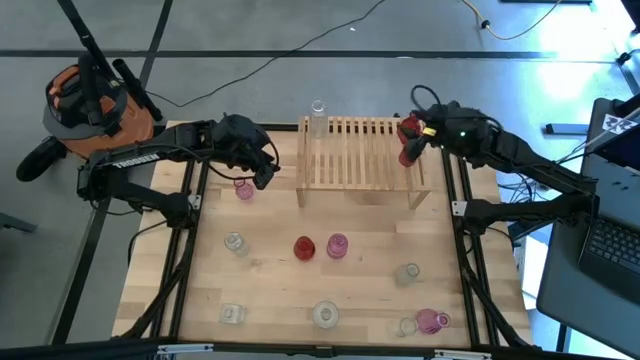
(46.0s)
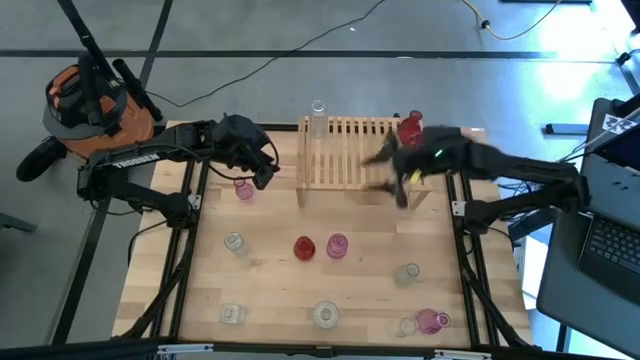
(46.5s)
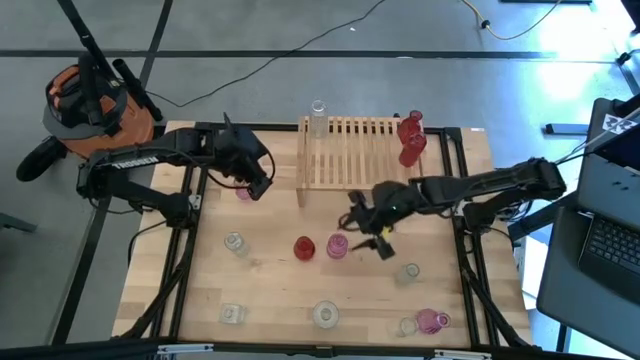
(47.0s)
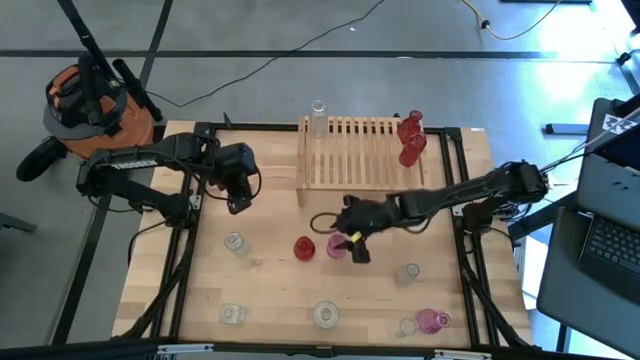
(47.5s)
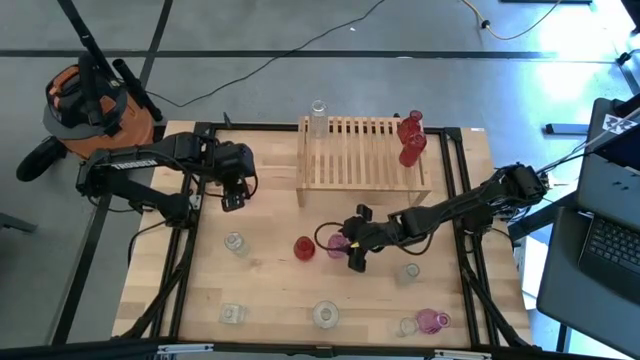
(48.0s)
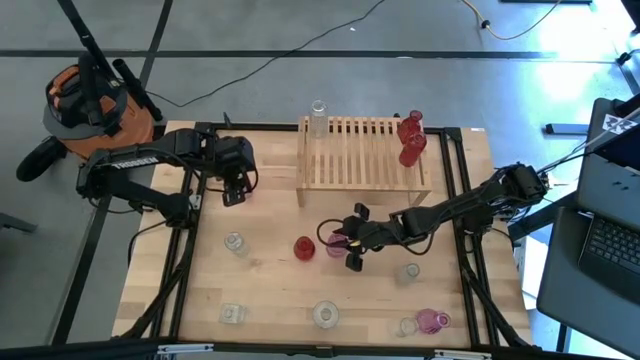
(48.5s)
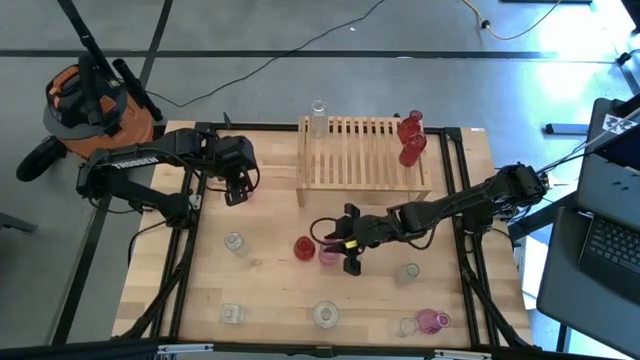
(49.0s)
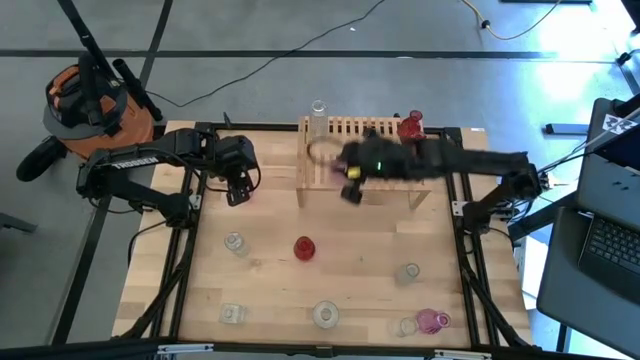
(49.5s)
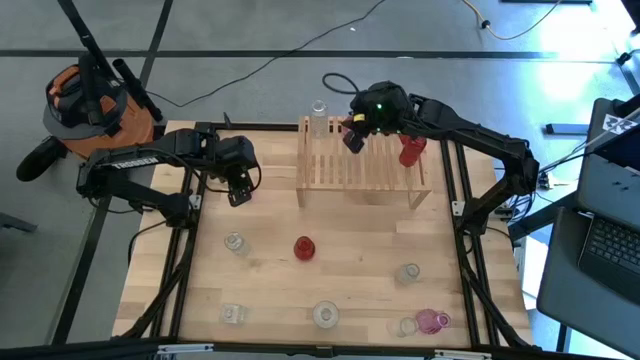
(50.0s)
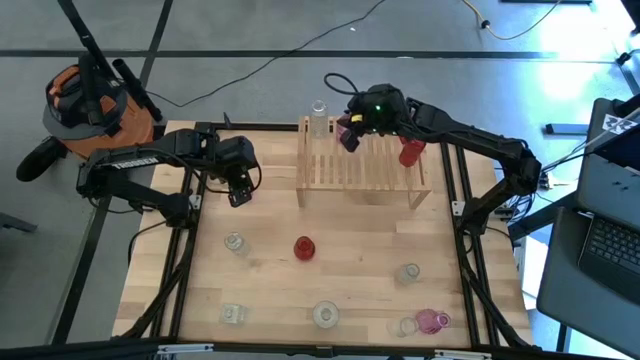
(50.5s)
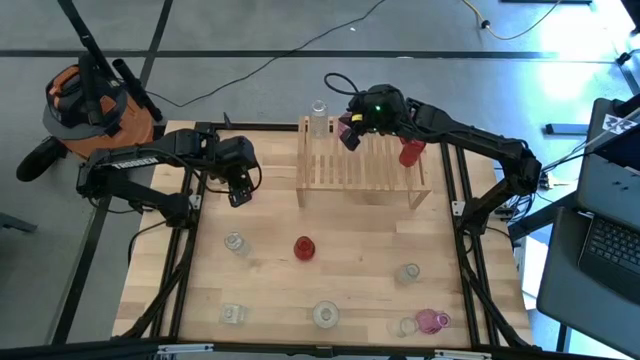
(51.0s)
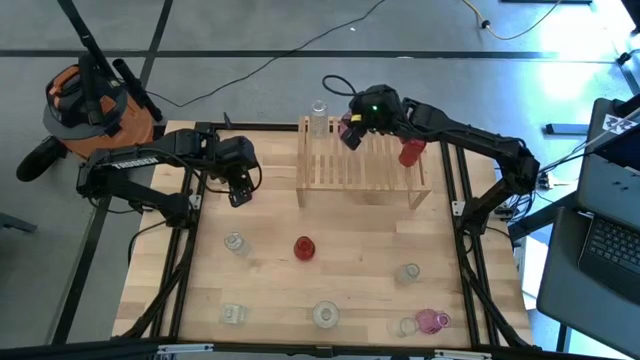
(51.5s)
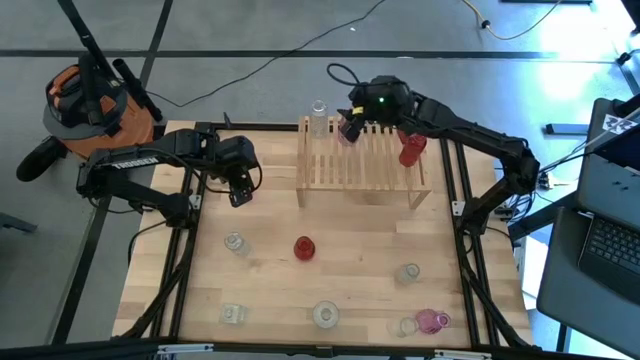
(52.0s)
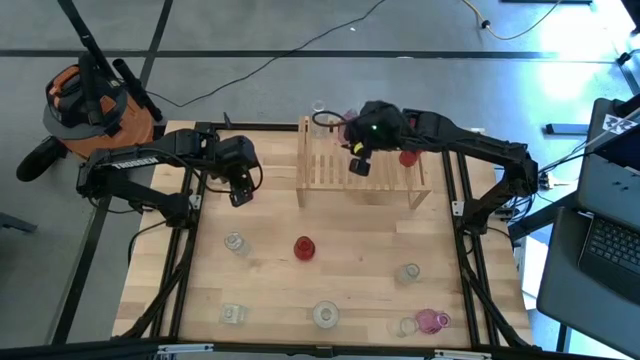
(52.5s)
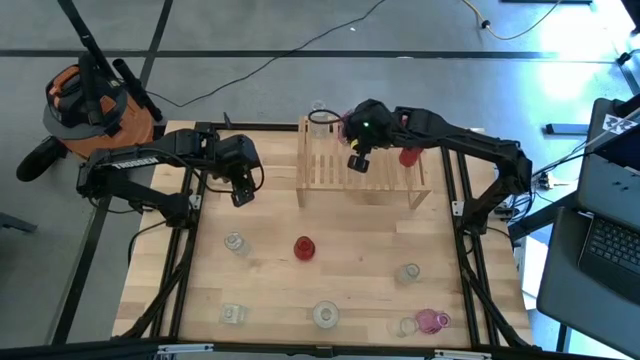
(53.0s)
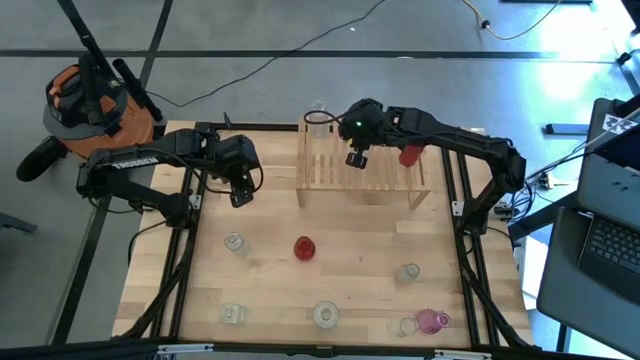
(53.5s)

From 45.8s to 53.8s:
Task: sort vases onto shelf
Put the middle pink vase on the shelf

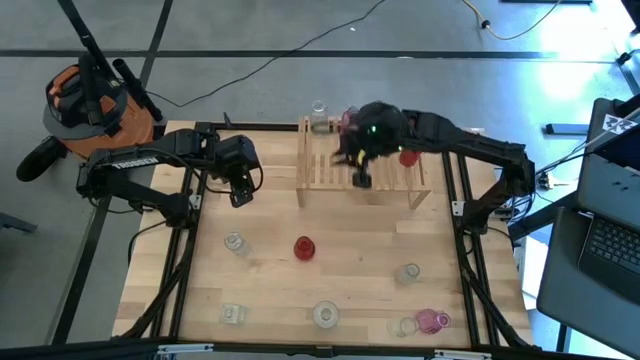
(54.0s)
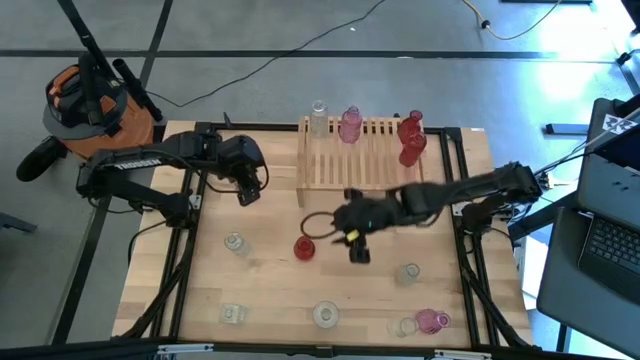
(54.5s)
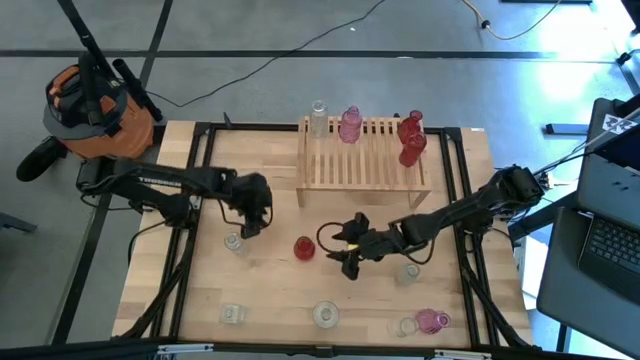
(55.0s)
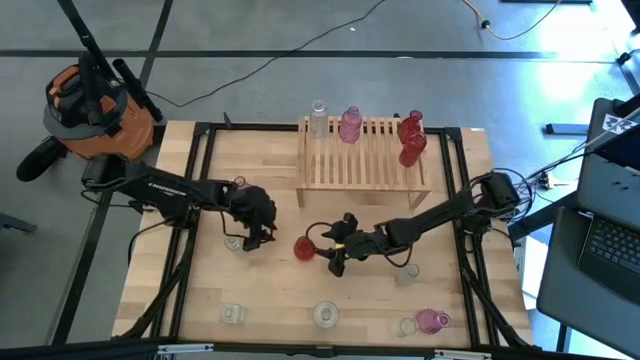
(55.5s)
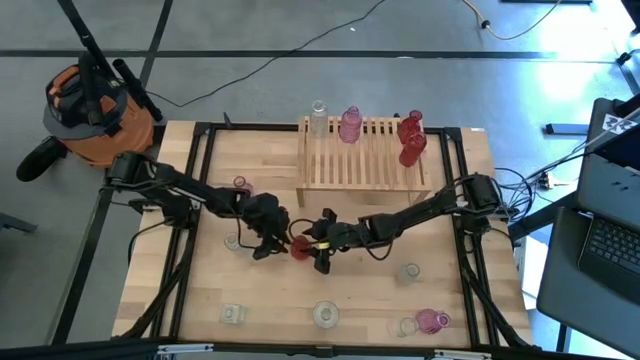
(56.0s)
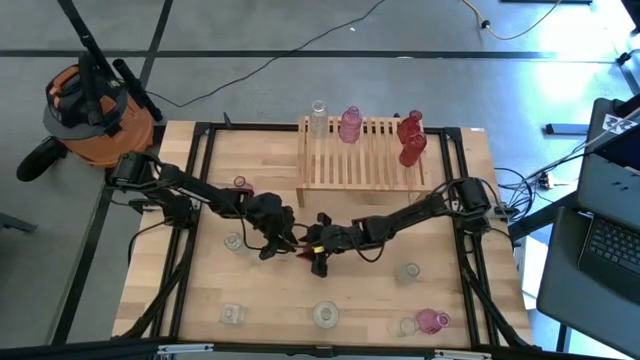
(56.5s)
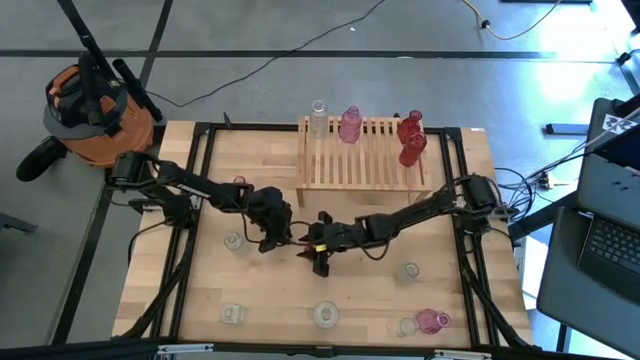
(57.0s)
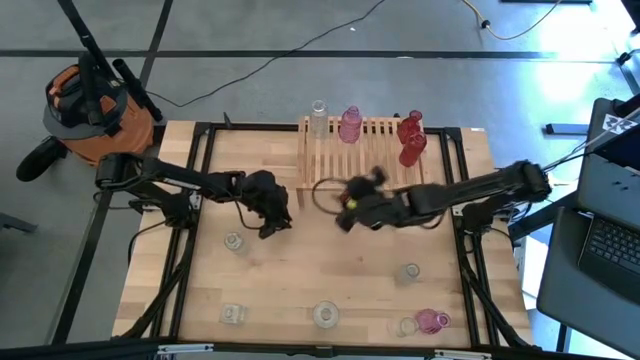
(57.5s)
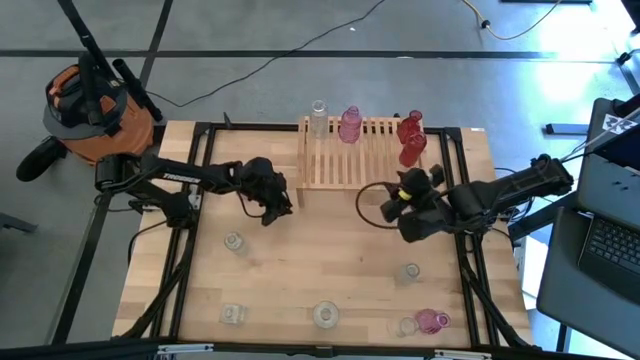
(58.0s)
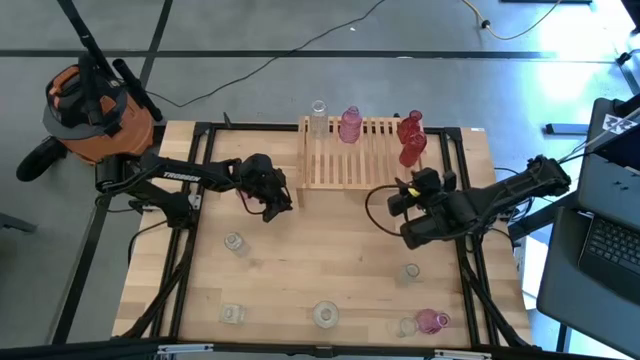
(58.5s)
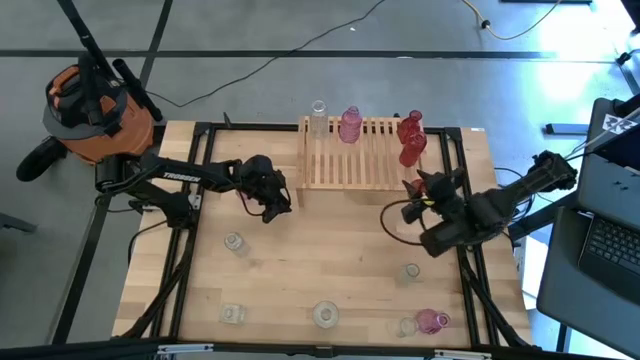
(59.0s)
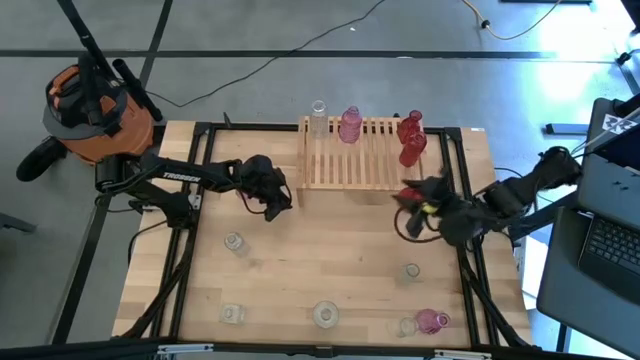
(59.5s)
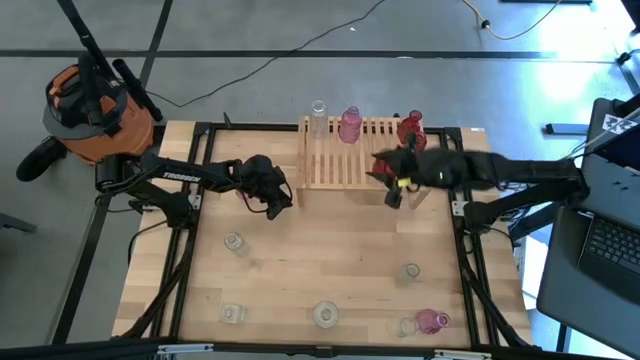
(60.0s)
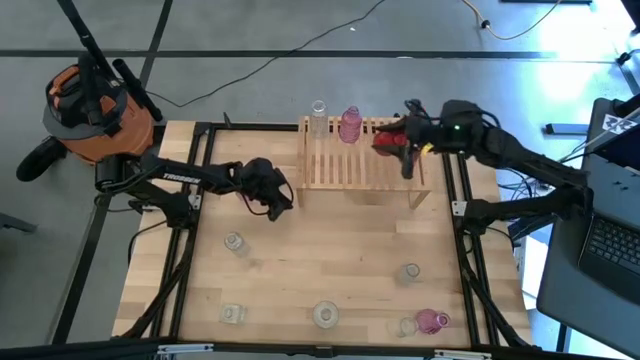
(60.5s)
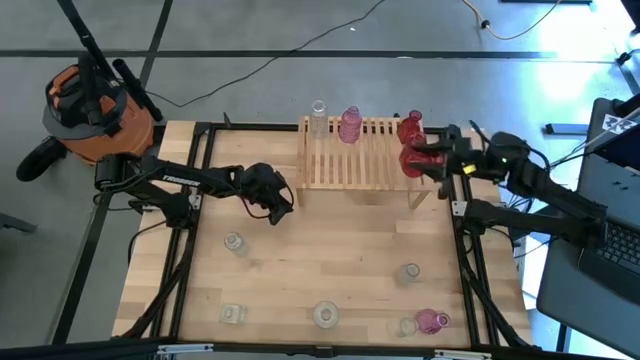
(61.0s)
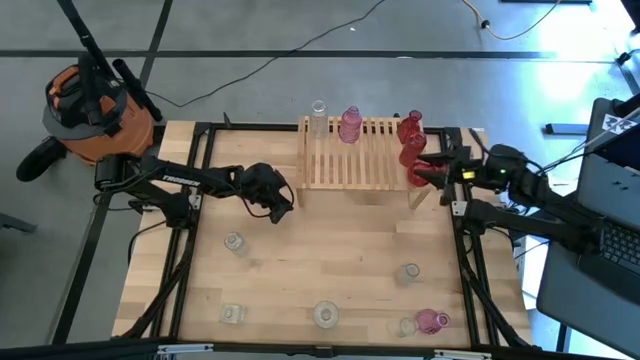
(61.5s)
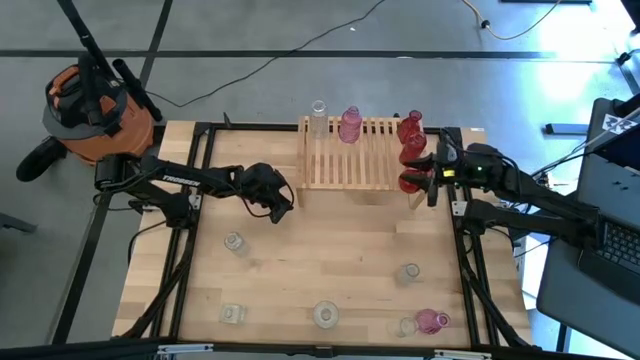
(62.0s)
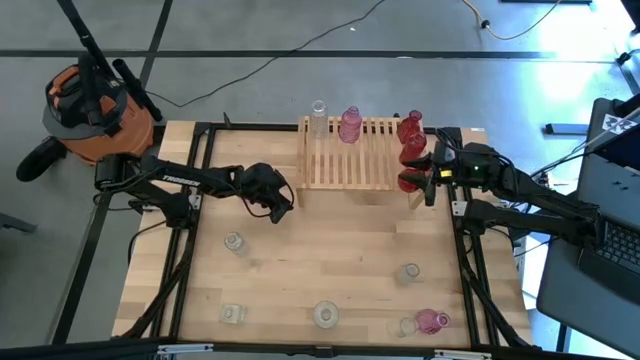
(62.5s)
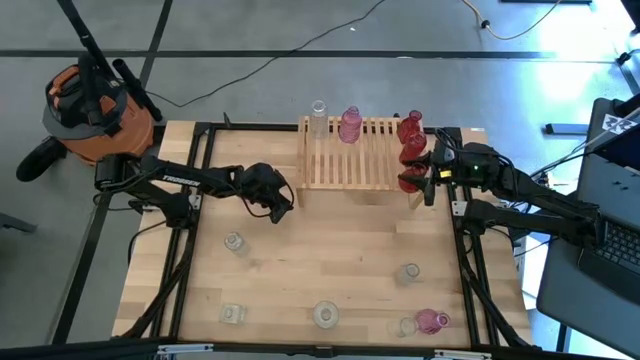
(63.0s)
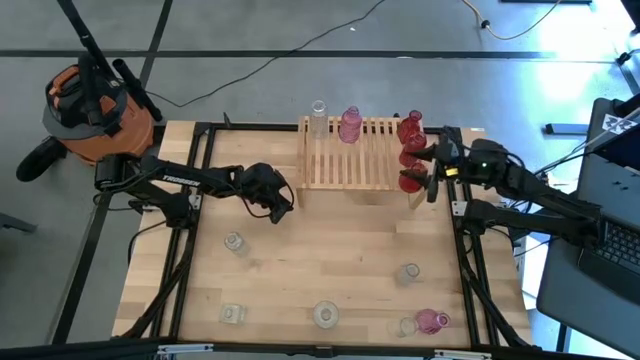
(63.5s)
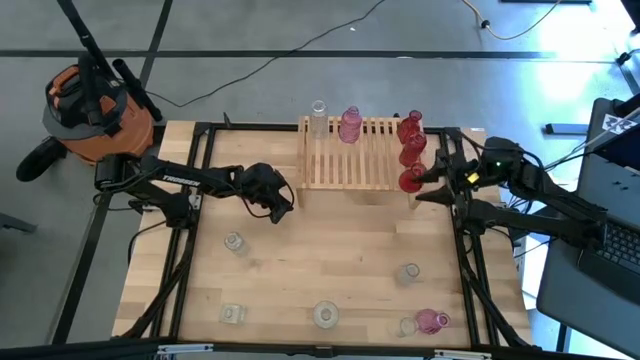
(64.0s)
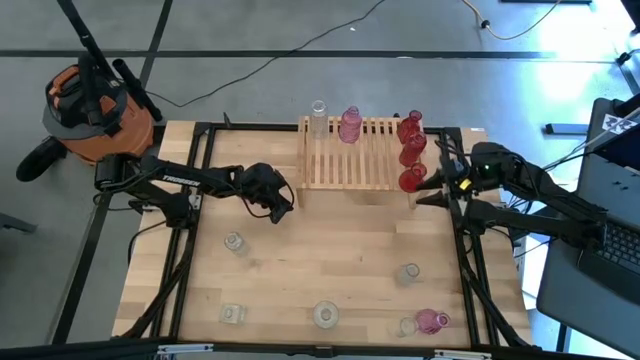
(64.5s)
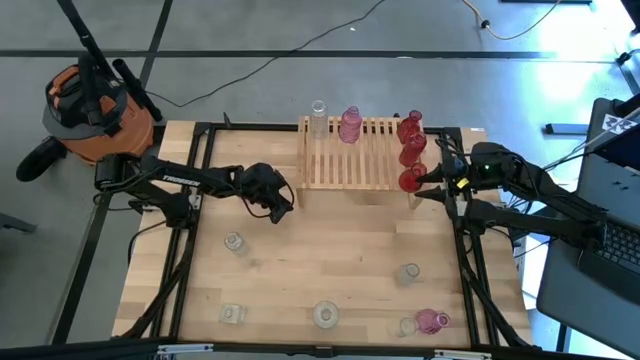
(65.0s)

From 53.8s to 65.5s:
Put the red vase on the shelf aligned with the other red vase

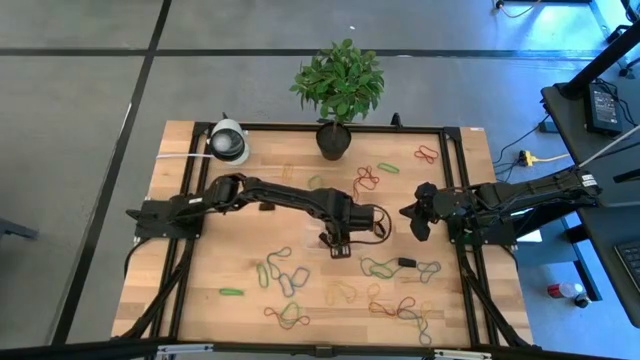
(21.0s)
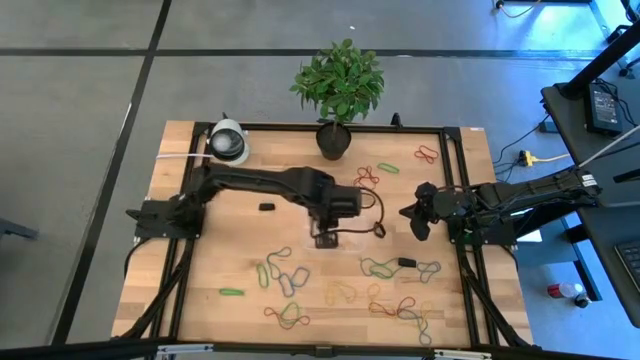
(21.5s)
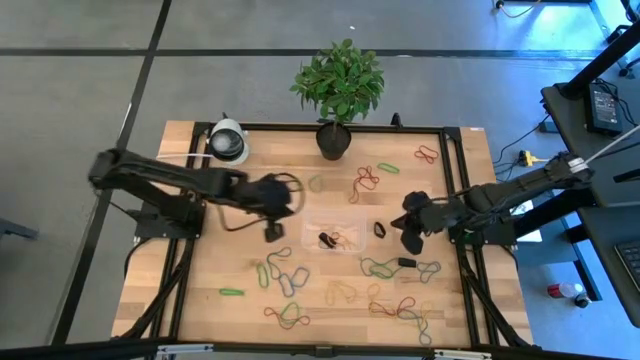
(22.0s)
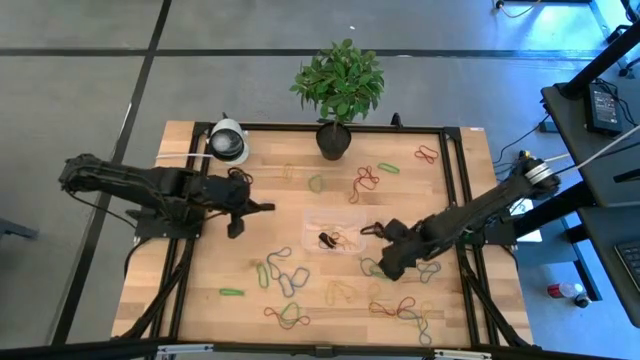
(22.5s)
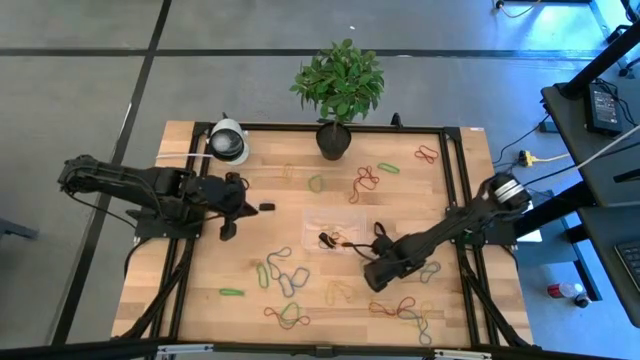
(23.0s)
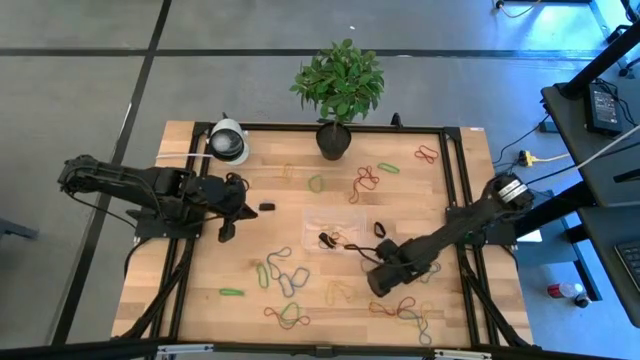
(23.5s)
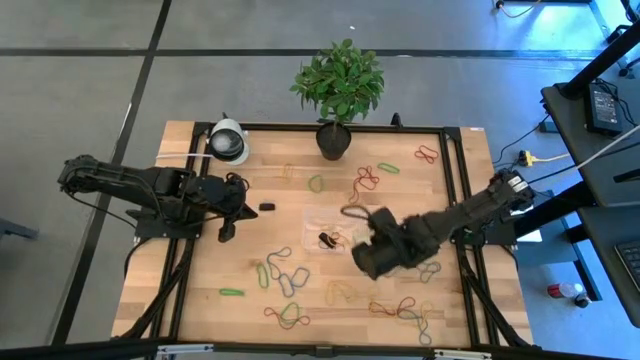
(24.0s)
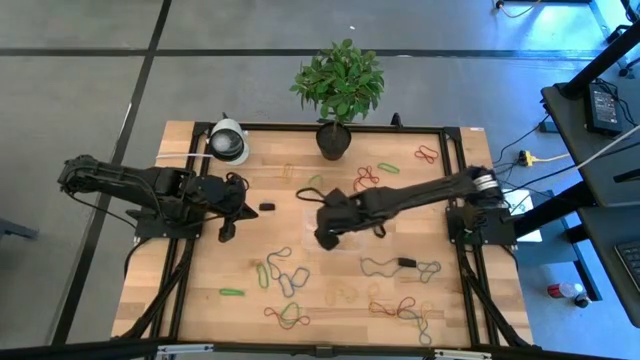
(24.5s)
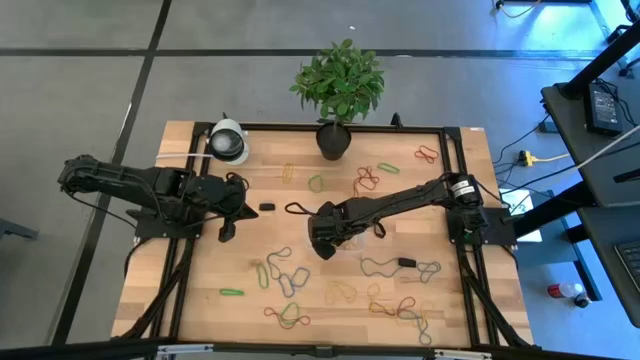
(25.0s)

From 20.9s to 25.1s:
Task: Pick and place rubber bands into bin
Put the green rubber band into the bin
